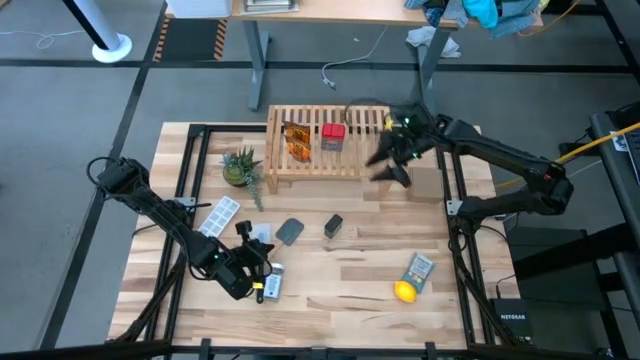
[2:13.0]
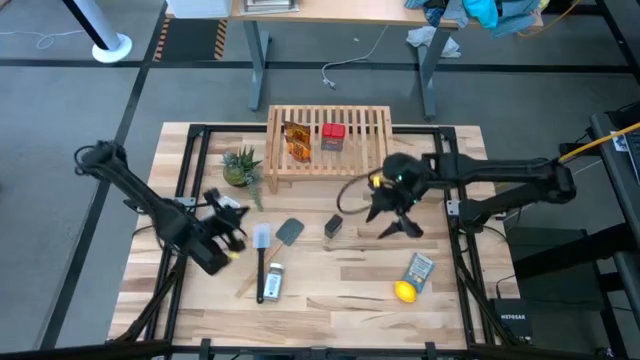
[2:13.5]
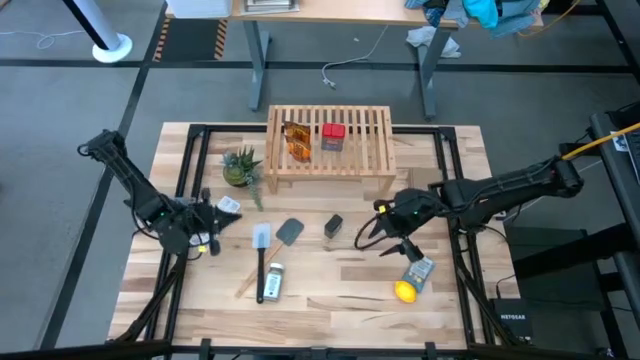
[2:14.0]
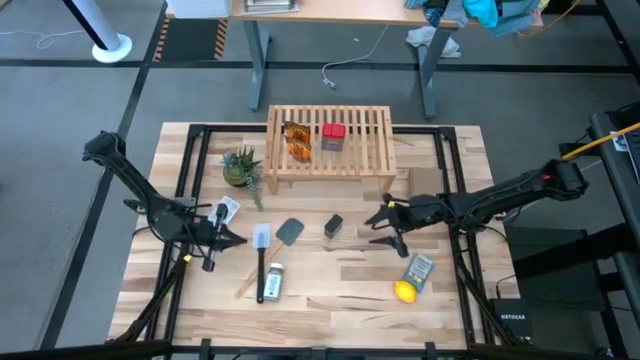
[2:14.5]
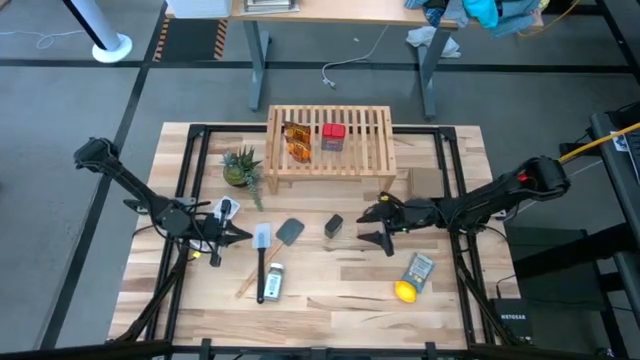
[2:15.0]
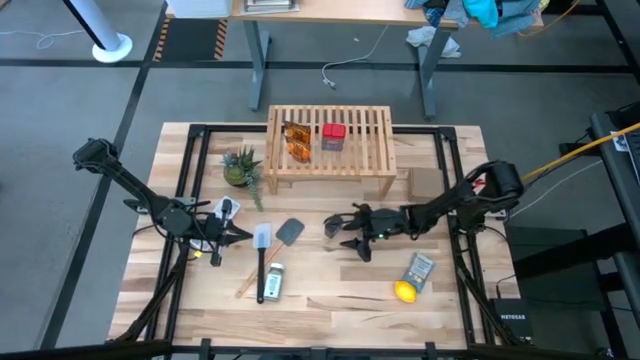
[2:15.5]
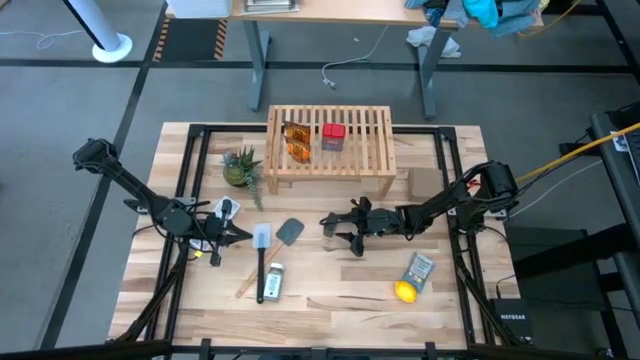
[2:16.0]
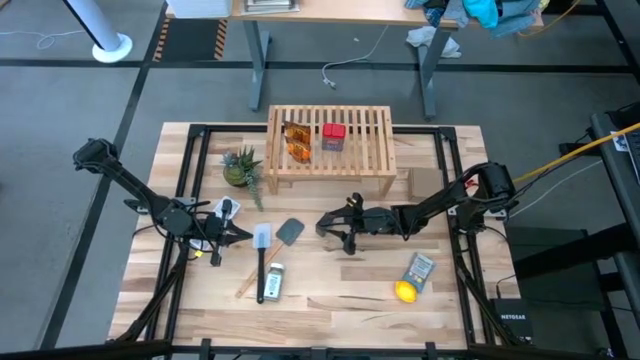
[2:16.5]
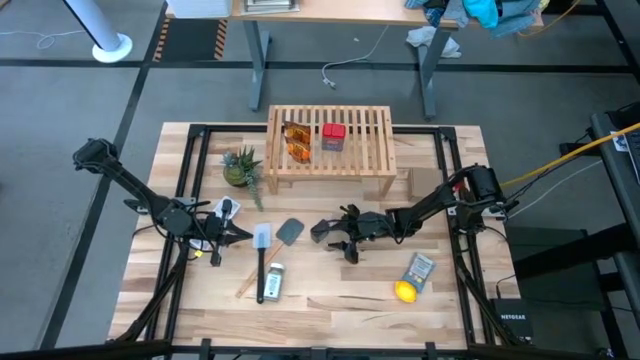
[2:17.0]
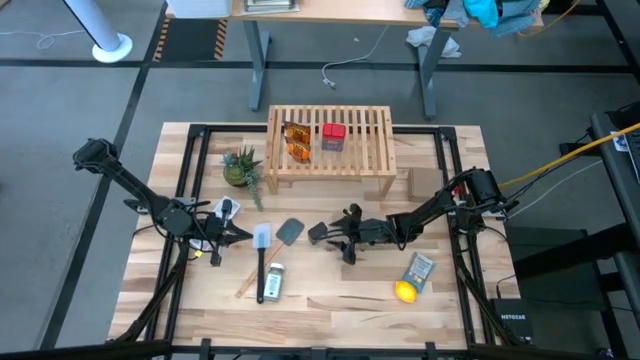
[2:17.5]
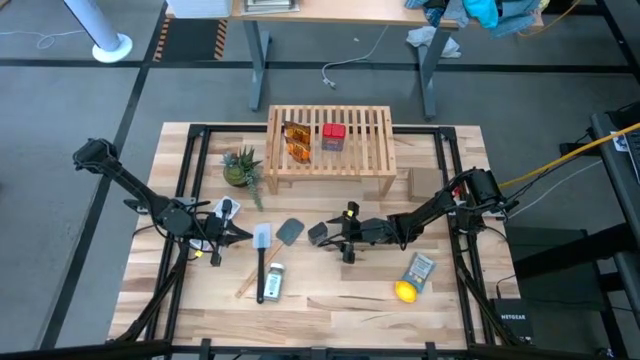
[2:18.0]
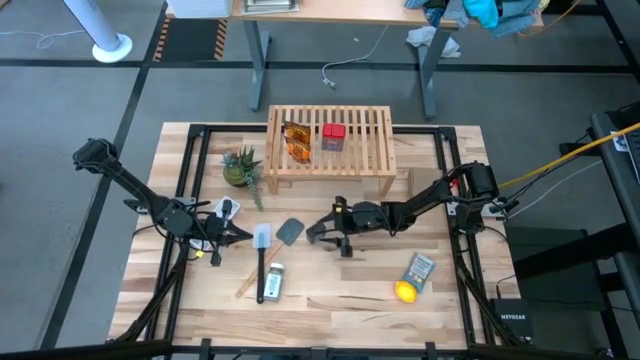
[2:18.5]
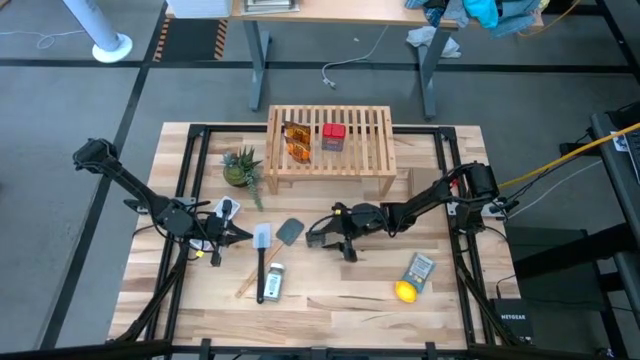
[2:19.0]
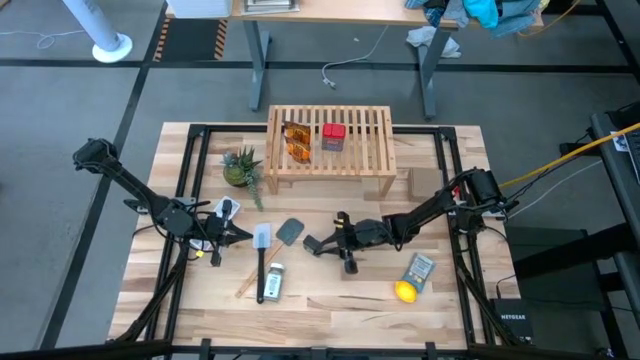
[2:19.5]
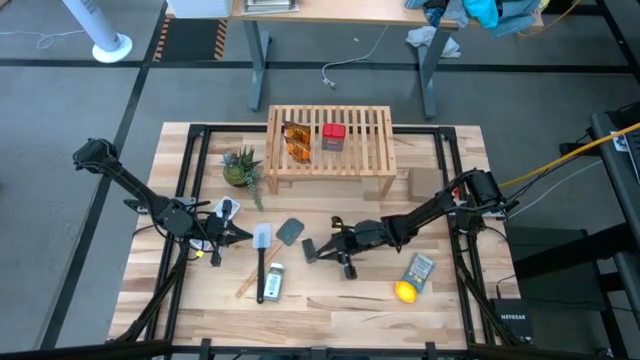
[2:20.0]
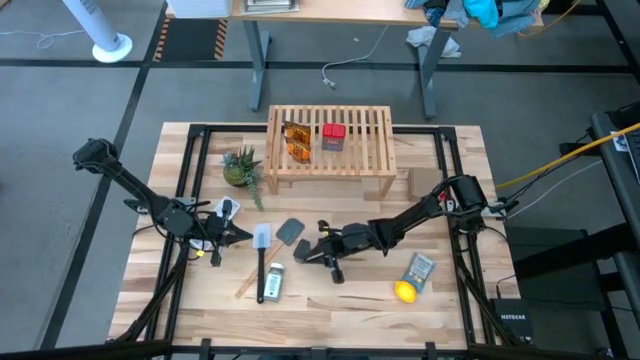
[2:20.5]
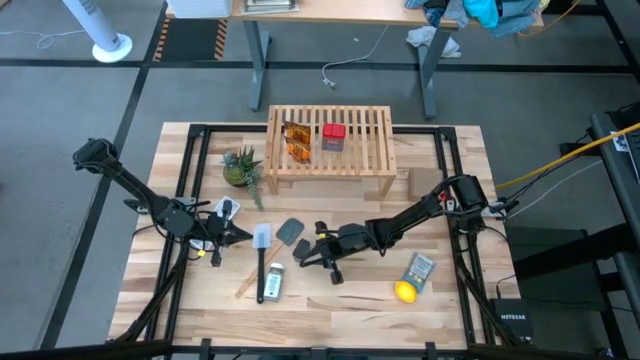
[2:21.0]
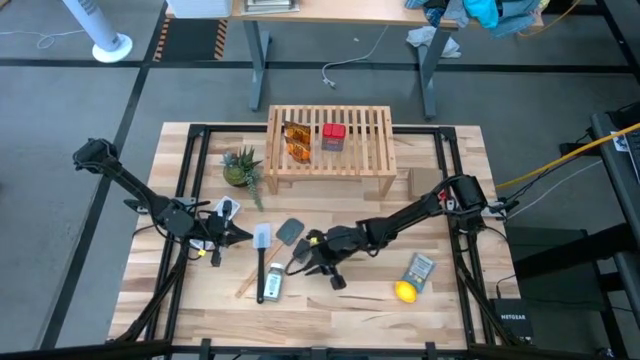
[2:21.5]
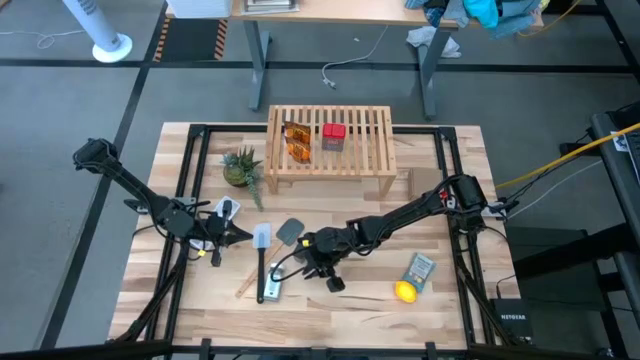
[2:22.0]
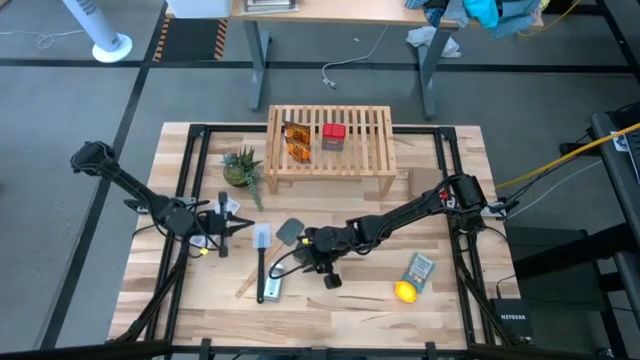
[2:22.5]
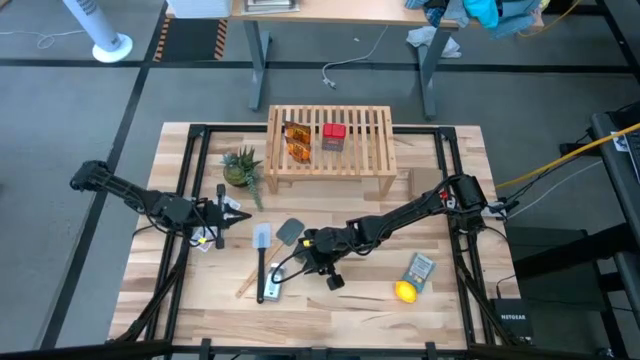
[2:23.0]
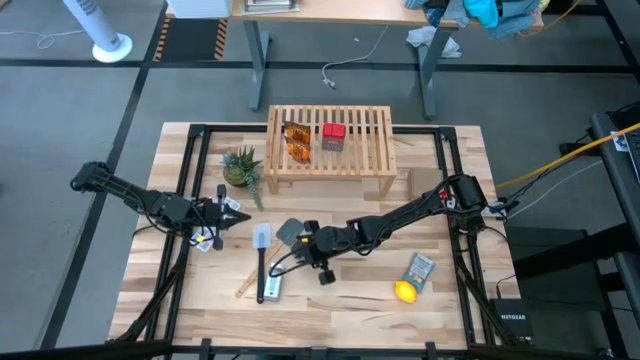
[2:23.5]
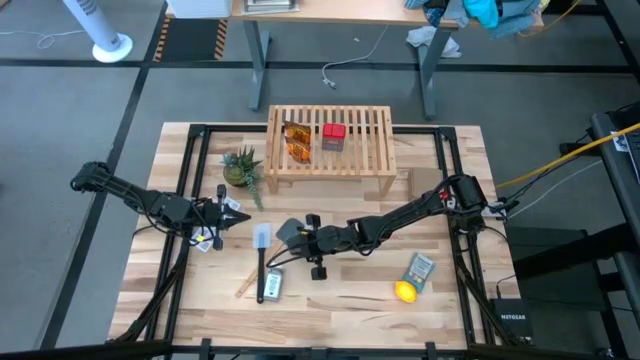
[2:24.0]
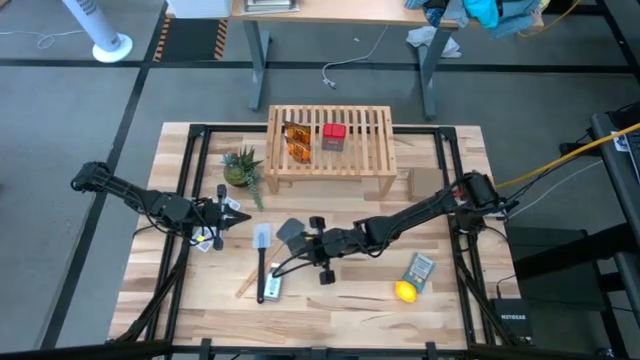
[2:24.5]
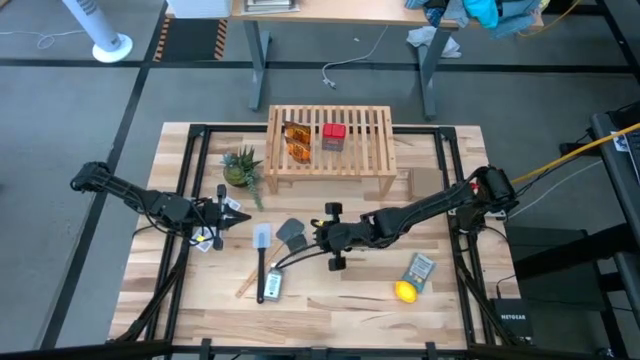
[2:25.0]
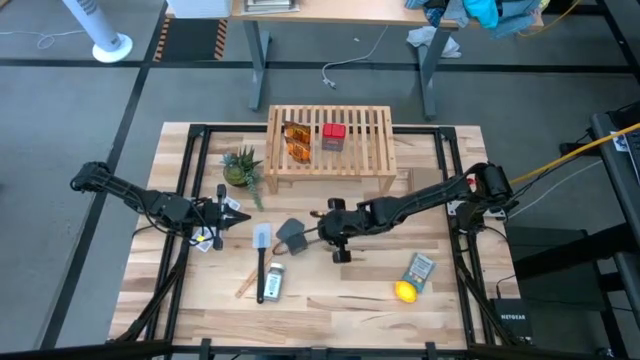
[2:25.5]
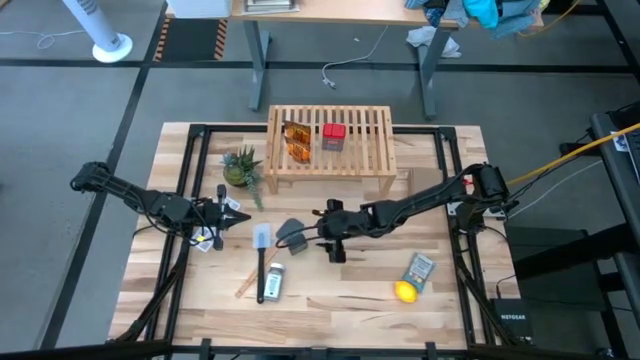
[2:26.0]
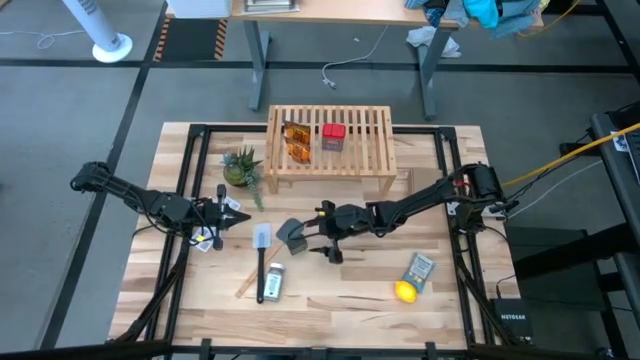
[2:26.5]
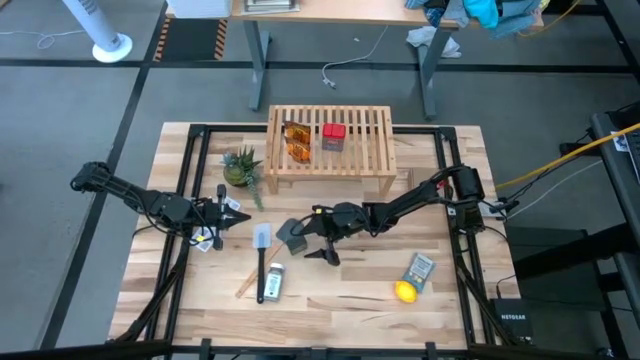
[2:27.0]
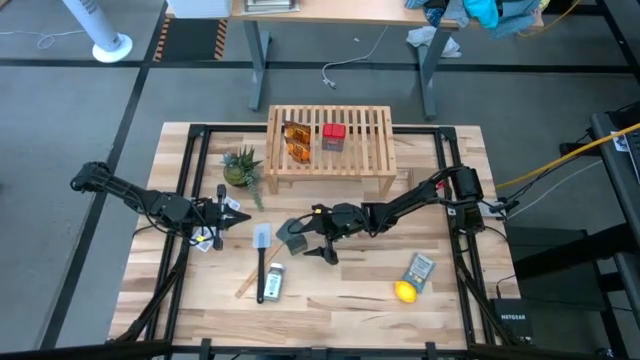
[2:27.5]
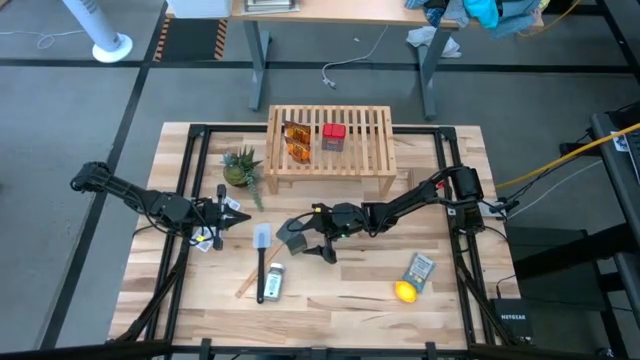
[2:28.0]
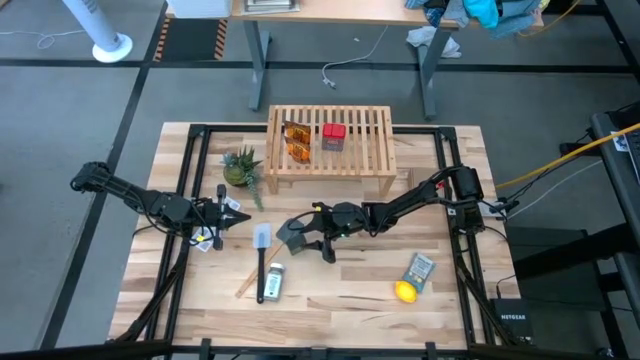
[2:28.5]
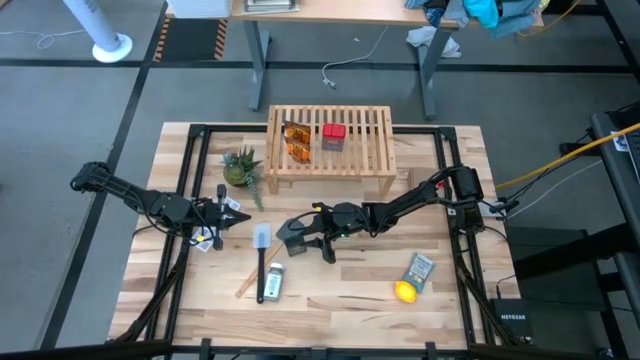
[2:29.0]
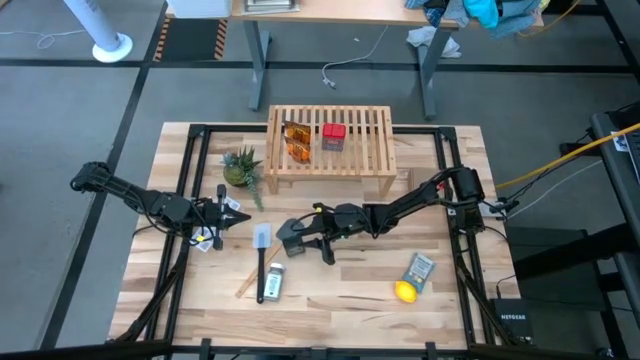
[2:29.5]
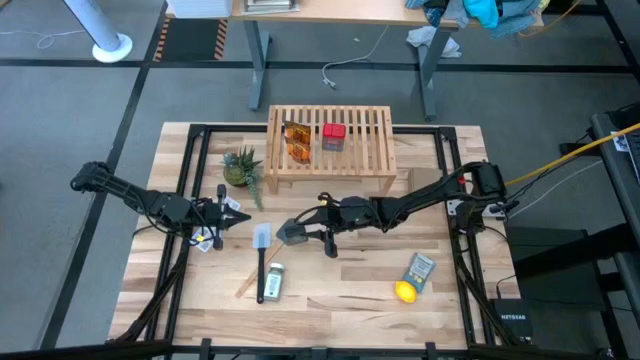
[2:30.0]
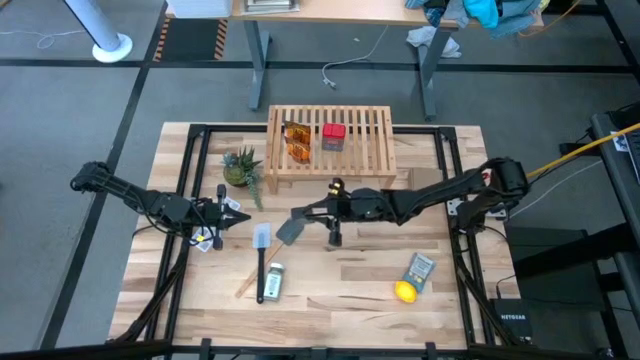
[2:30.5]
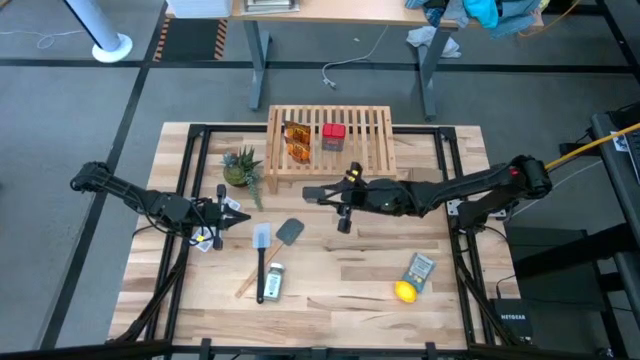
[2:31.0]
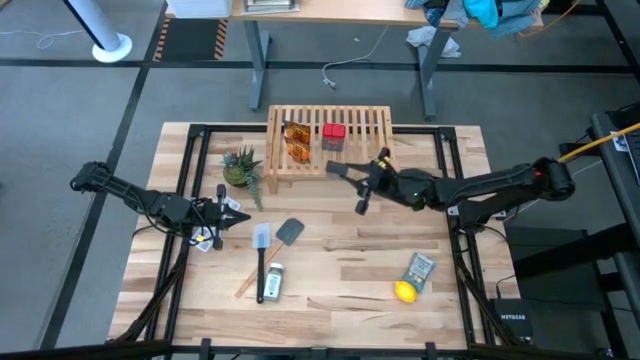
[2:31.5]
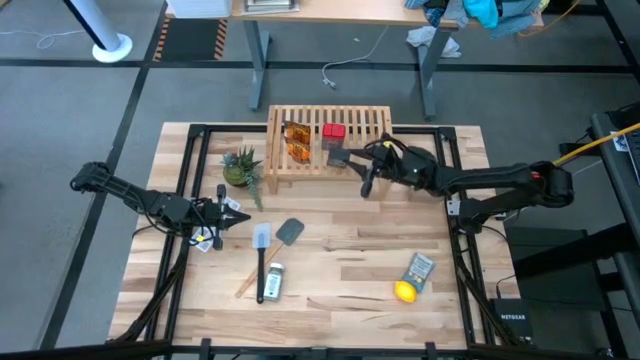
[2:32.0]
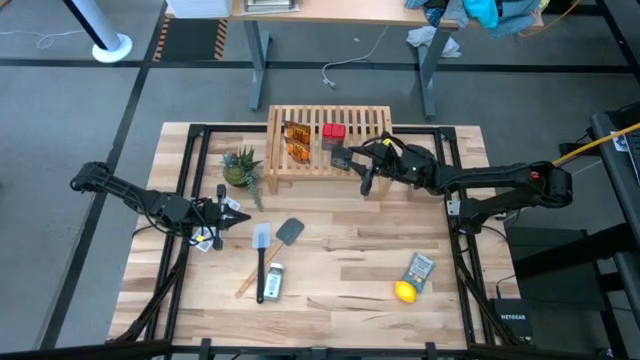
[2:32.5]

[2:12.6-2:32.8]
Task: Shelf spices
Put the black seasoning can on the shelf
